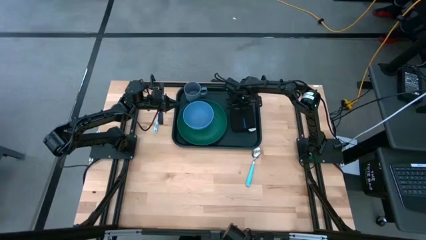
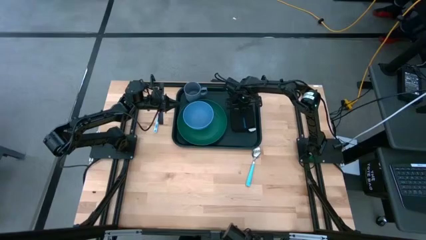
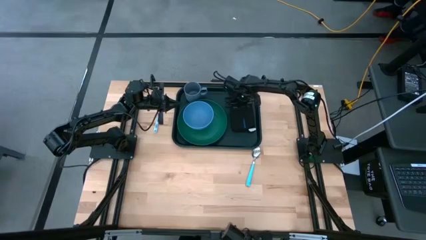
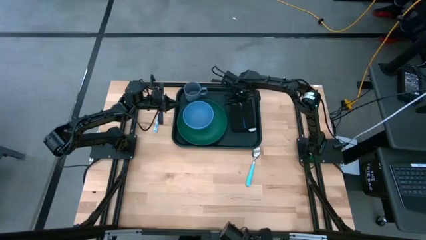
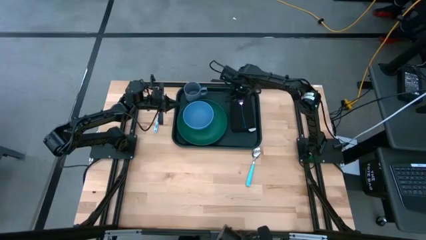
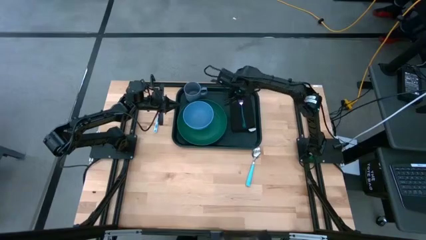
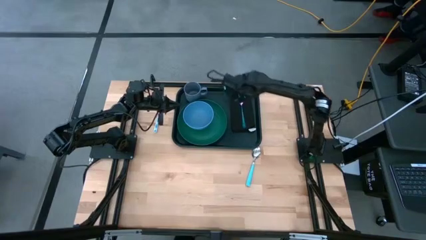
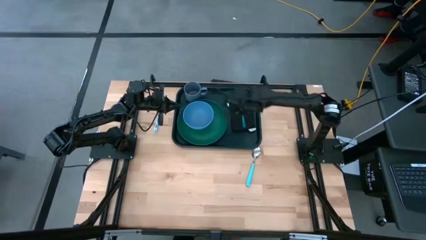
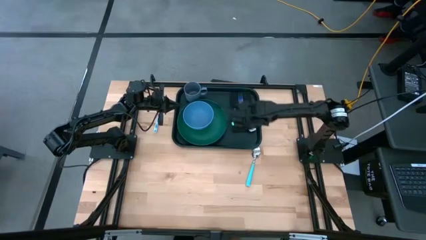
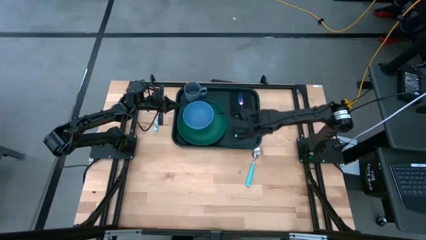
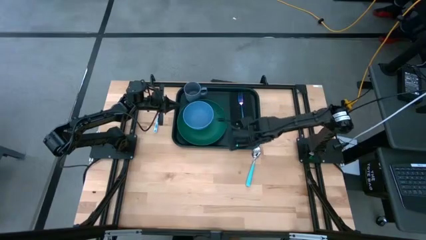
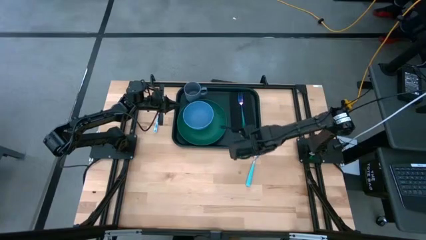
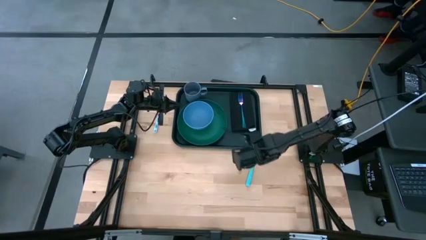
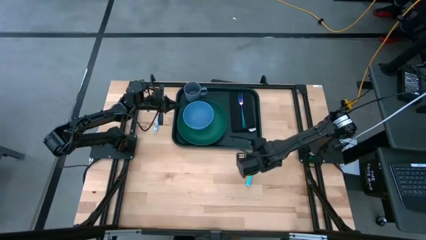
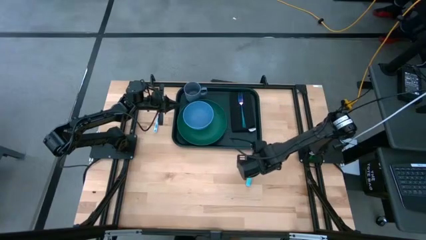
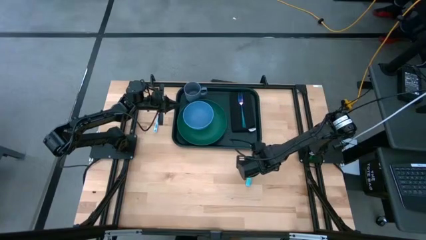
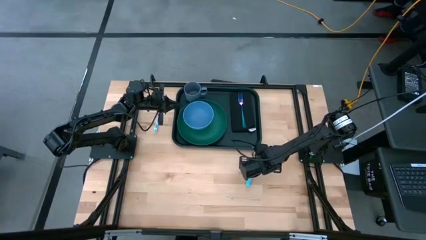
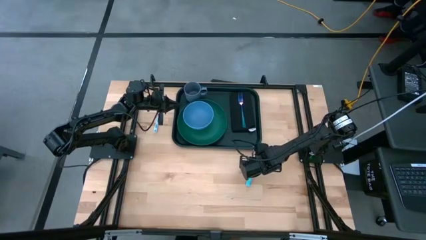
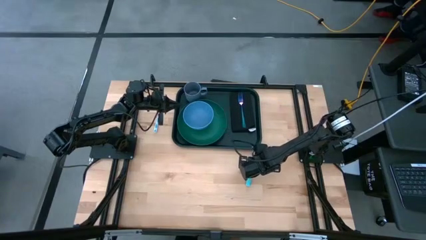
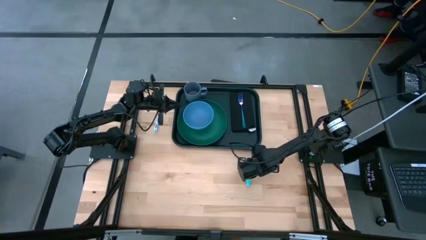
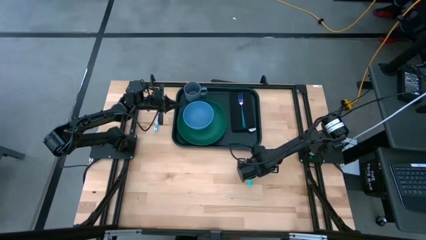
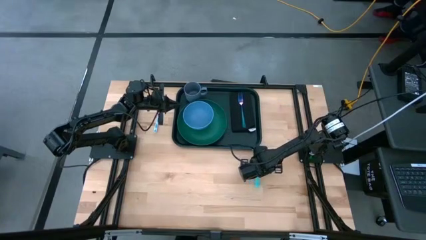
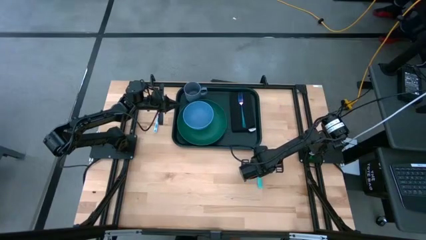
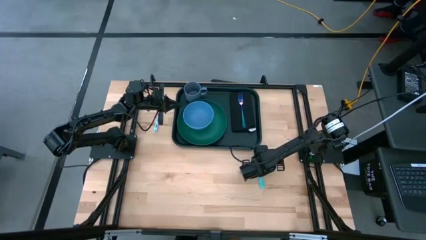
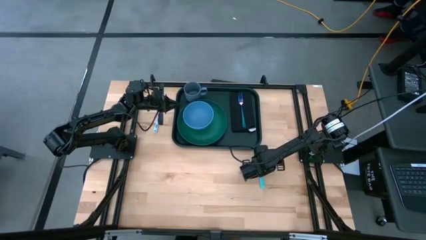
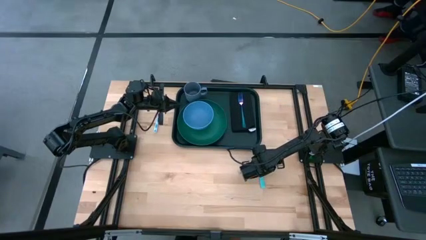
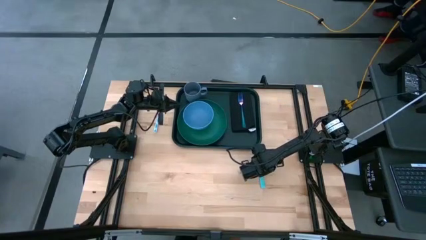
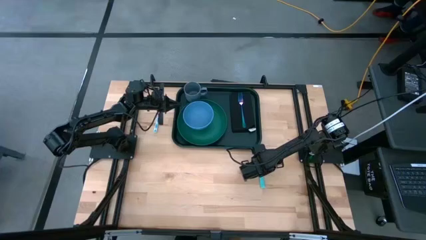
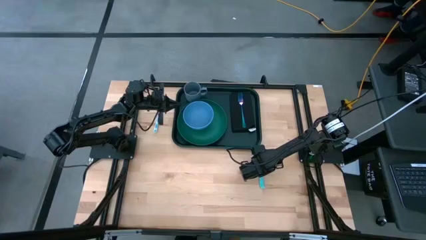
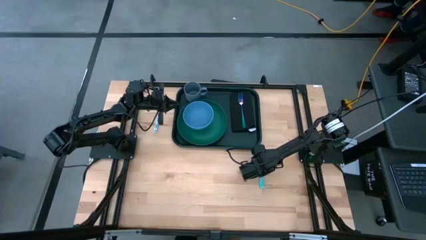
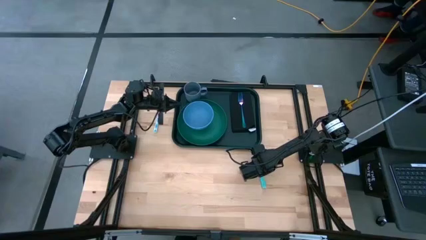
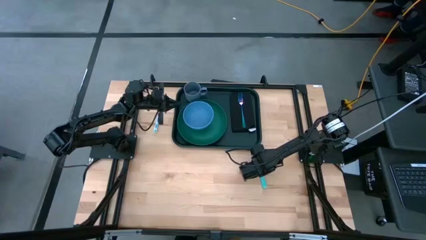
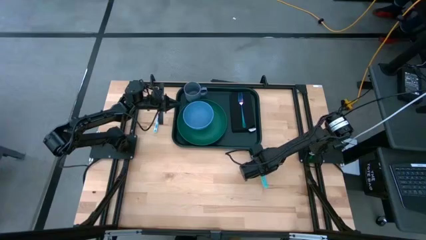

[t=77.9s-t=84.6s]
Task: Set up tray
Put the green spoon on the black table napkin beside the blue fork on the black tray

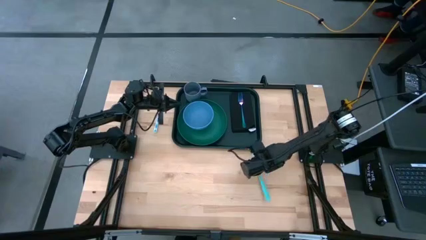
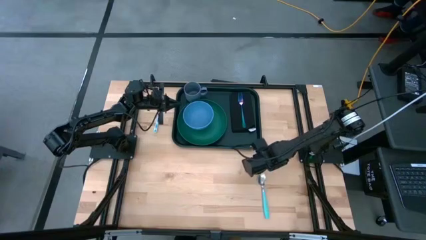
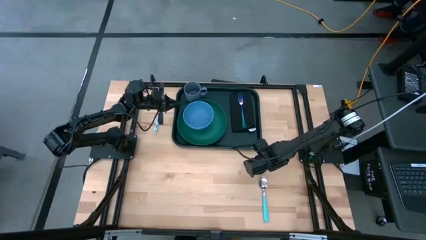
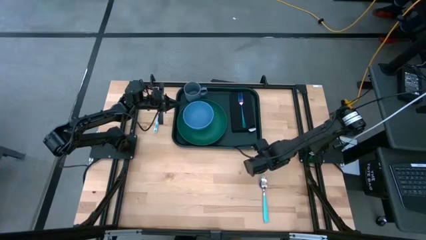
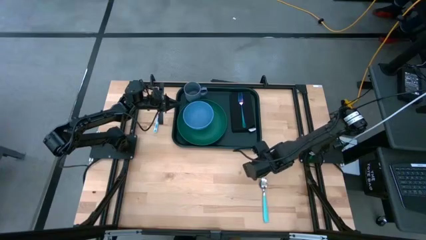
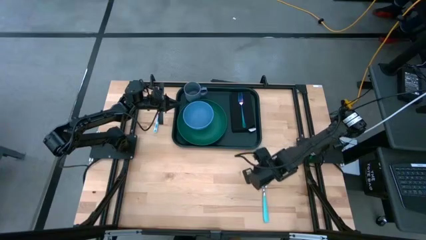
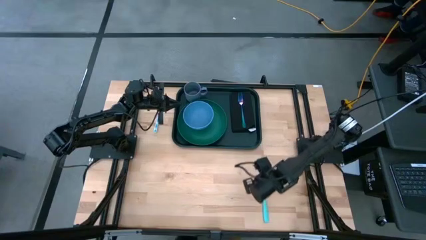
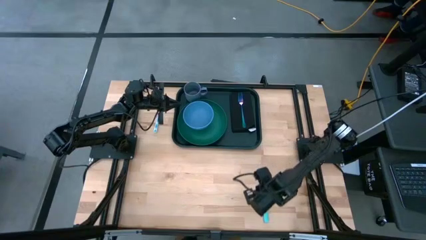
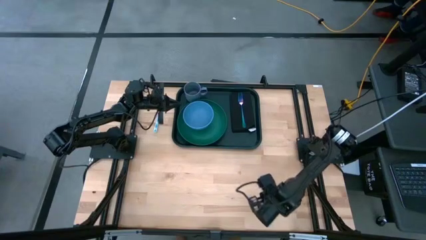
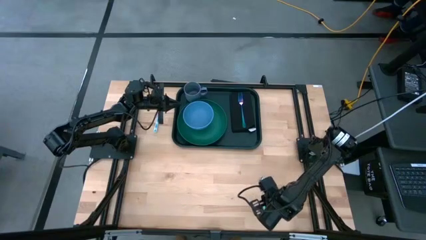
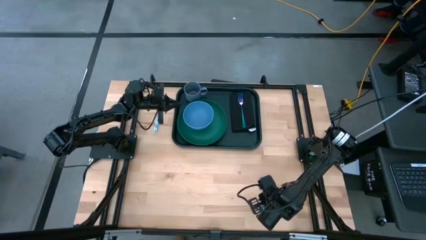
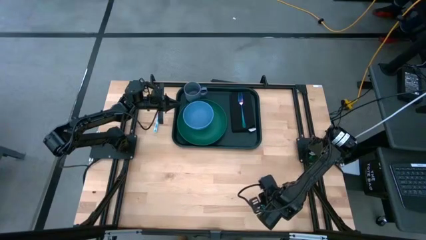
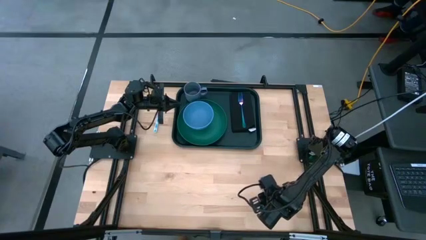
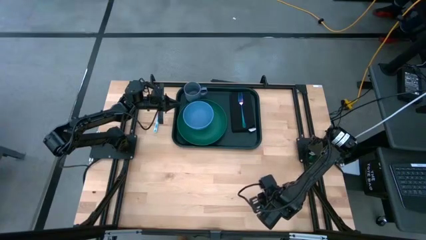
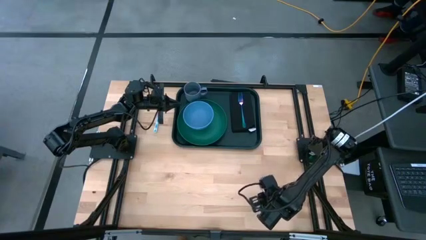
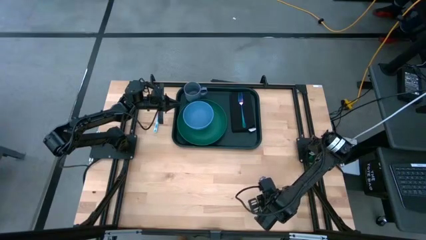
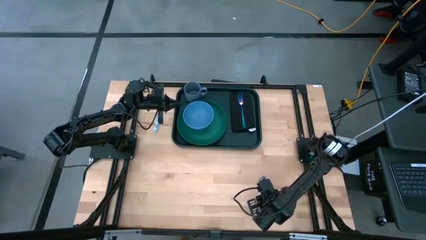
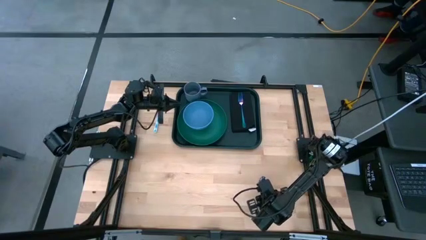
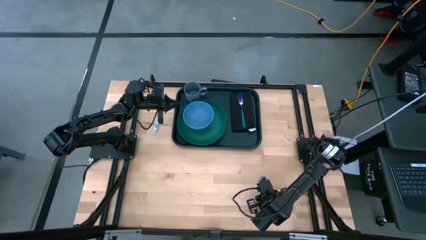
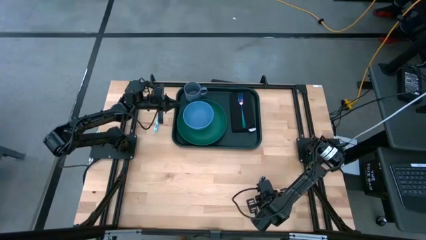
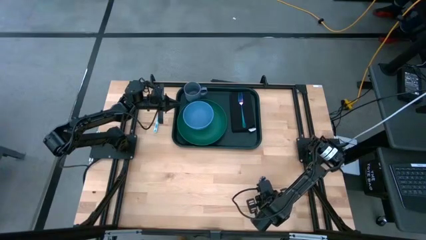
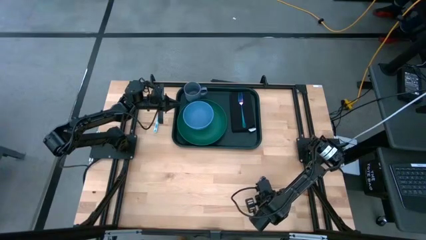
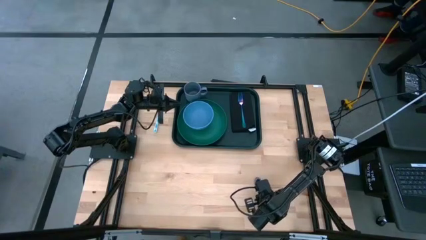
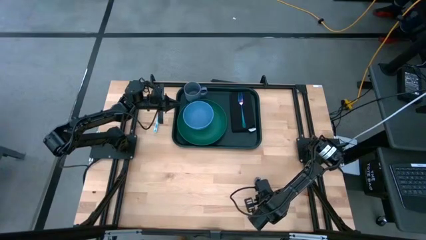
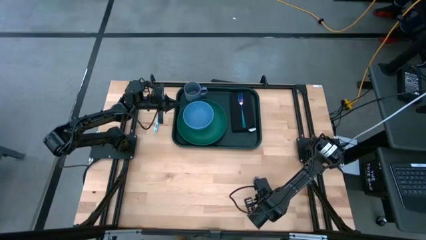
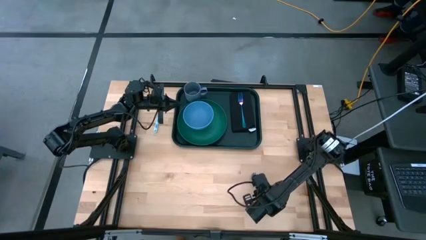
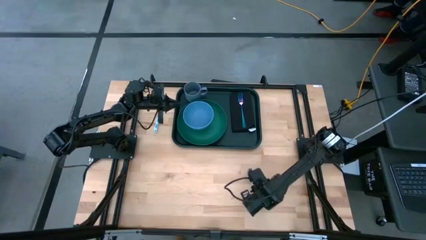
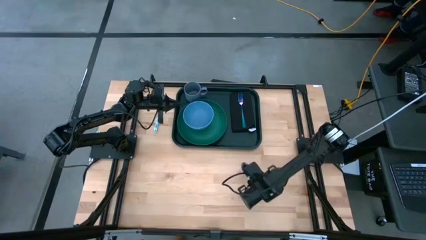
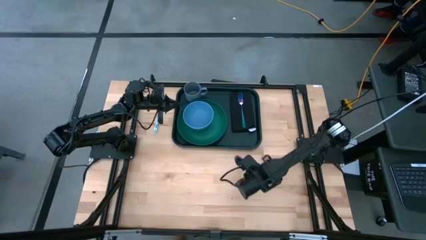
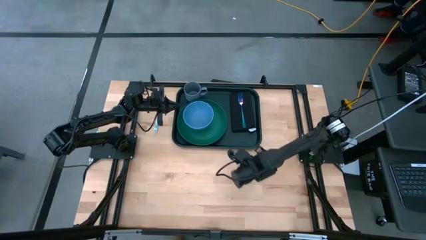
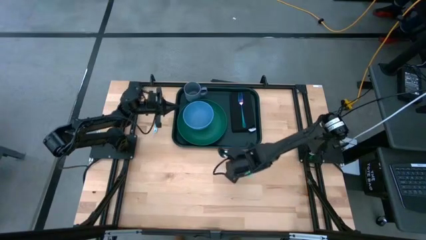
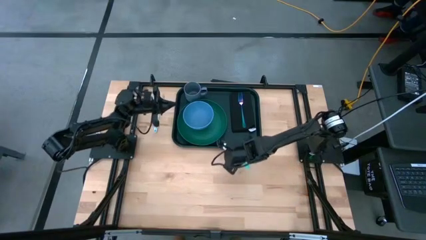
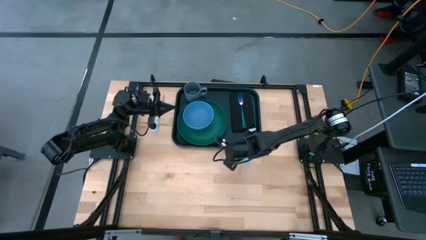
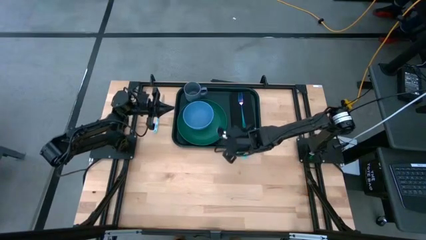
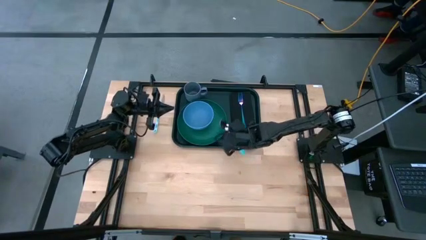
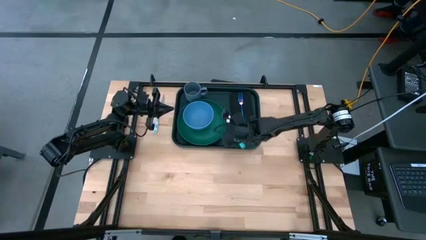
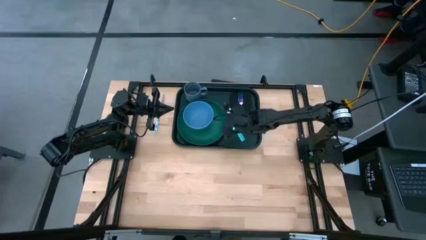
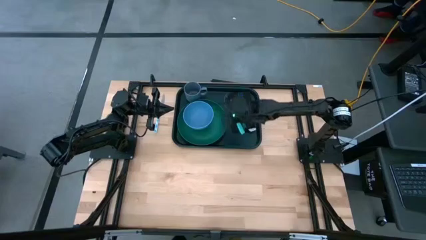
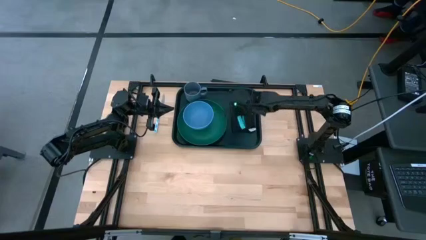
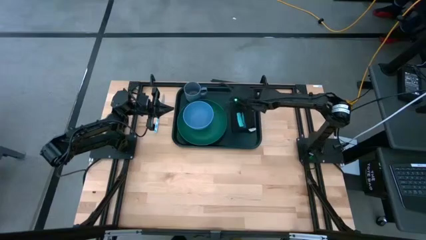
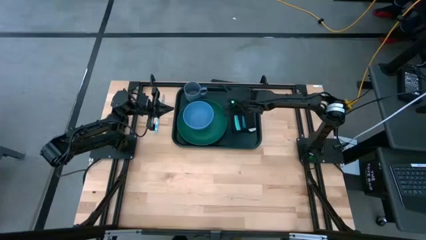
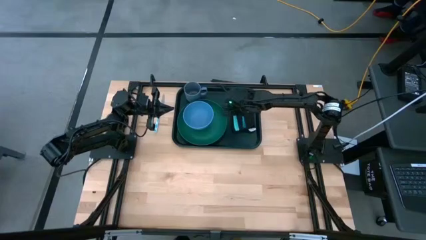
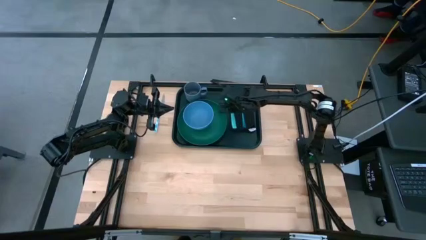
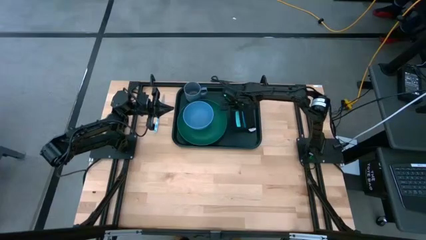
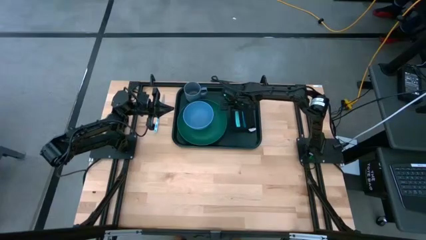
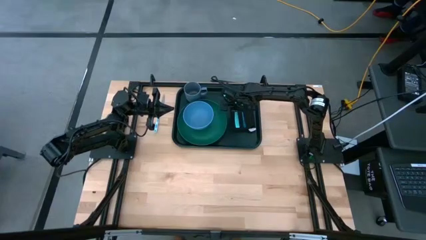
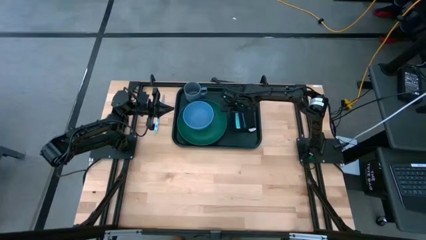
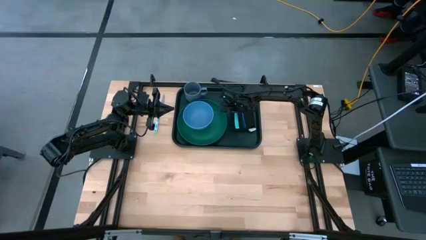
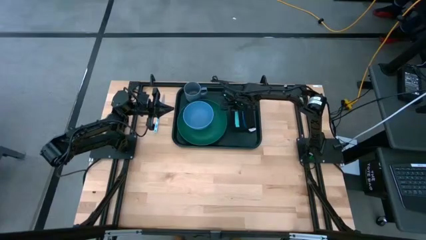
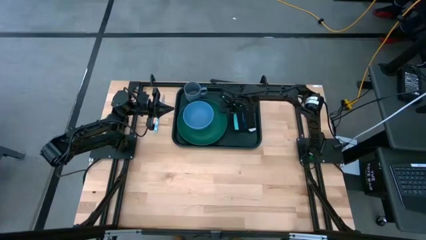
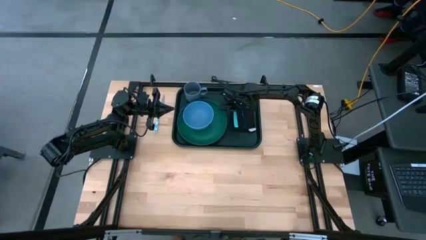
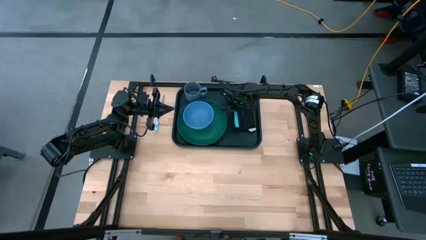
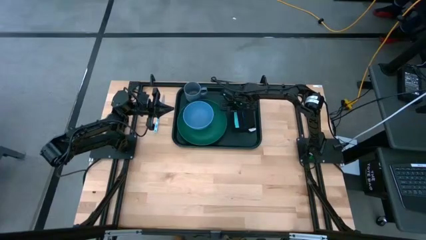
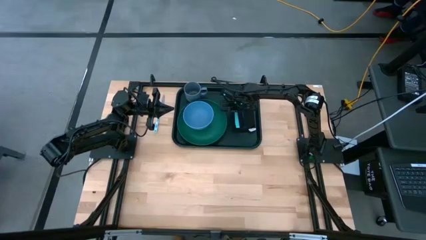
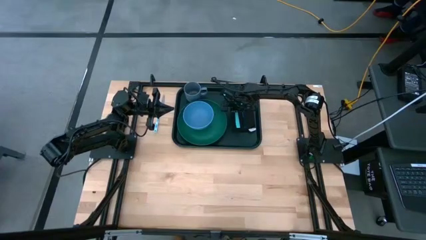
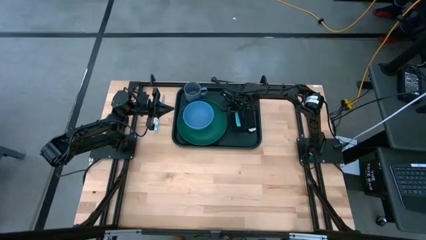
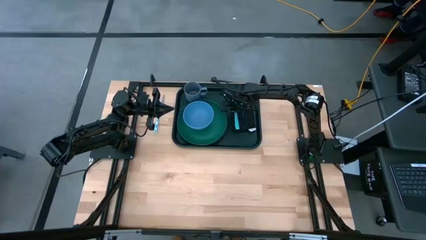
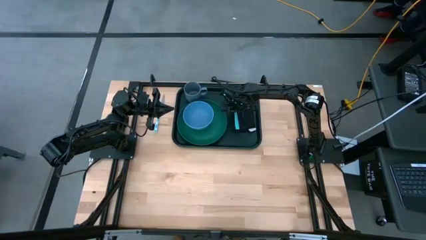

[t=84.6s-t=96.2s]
Put the green spoon on the black table napkin beside the blue fork on the black tray
